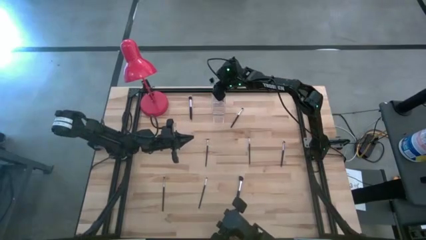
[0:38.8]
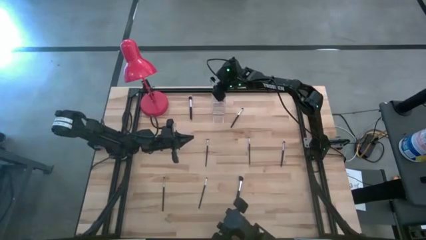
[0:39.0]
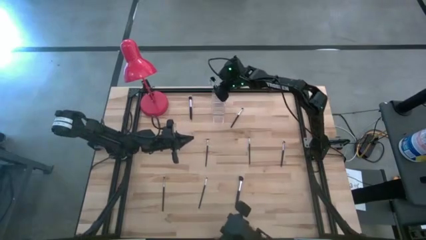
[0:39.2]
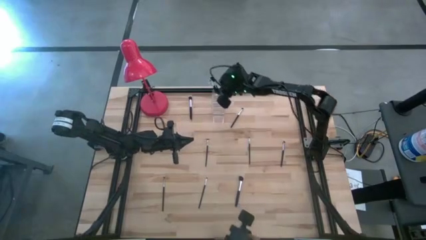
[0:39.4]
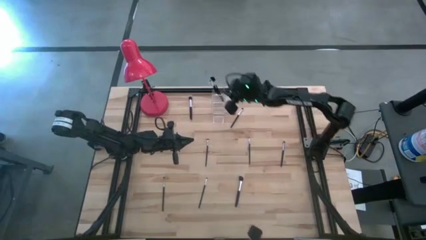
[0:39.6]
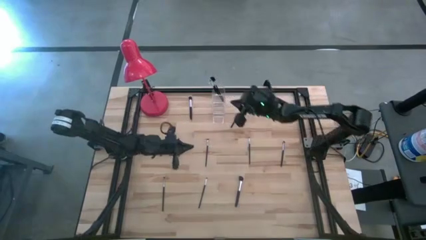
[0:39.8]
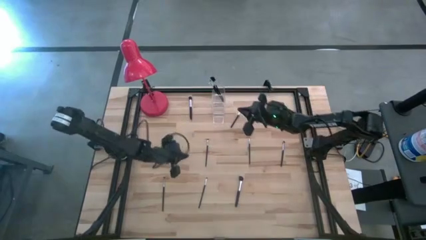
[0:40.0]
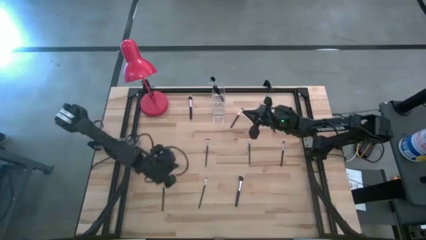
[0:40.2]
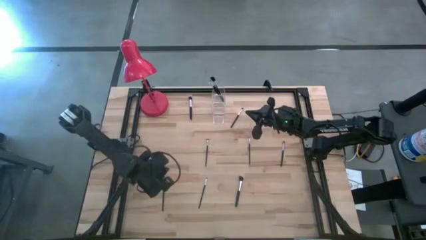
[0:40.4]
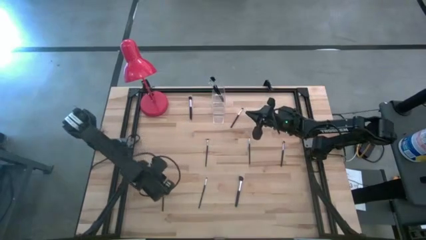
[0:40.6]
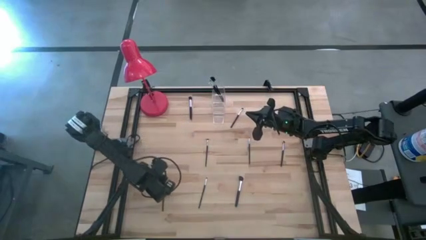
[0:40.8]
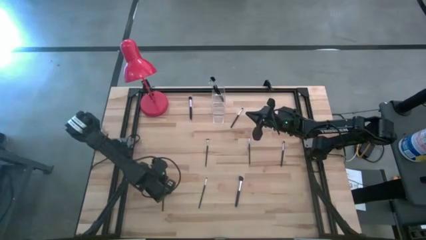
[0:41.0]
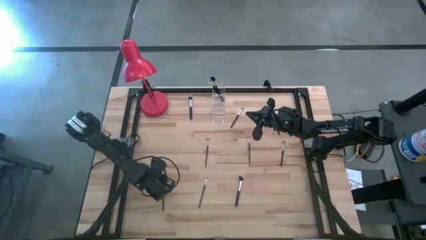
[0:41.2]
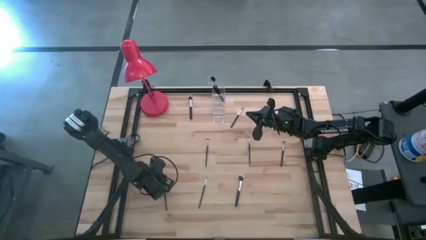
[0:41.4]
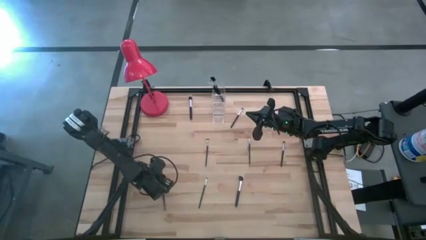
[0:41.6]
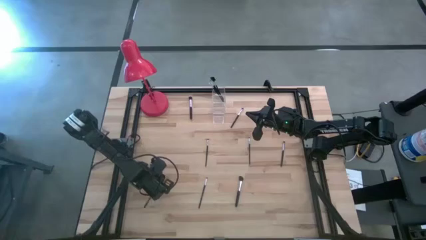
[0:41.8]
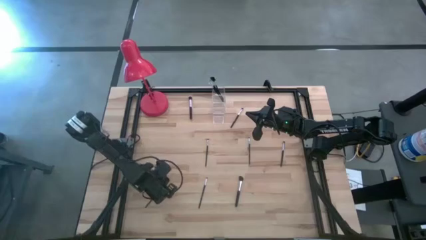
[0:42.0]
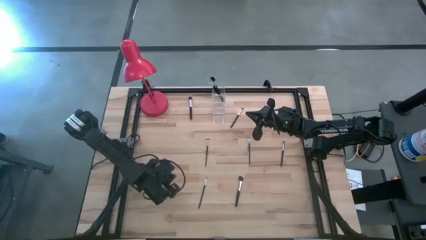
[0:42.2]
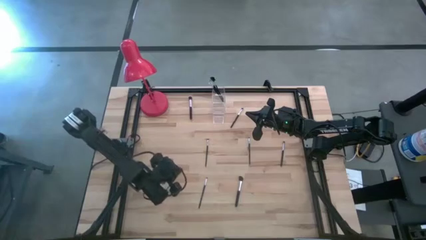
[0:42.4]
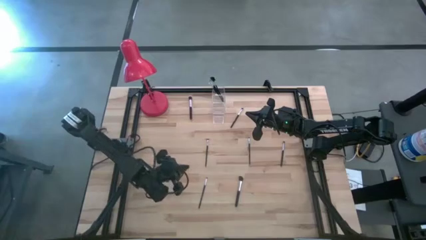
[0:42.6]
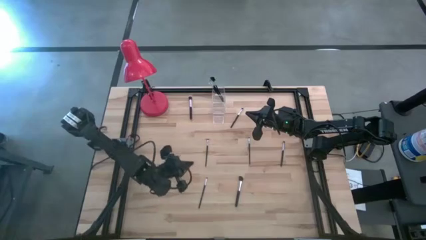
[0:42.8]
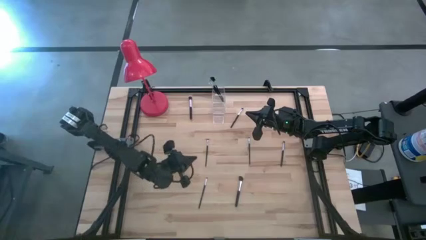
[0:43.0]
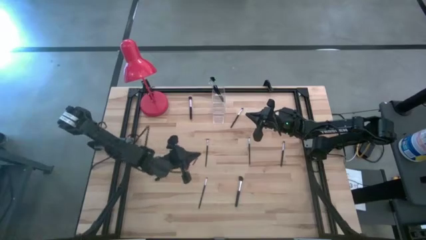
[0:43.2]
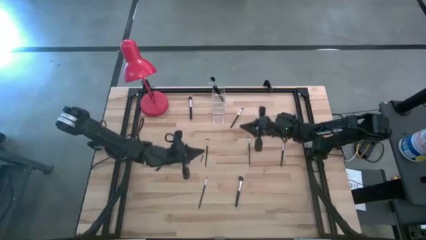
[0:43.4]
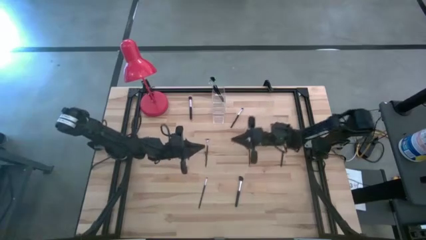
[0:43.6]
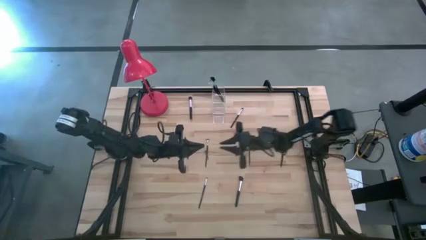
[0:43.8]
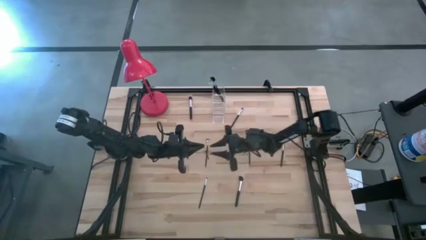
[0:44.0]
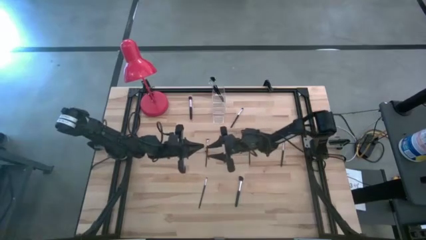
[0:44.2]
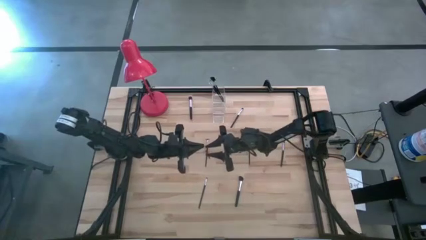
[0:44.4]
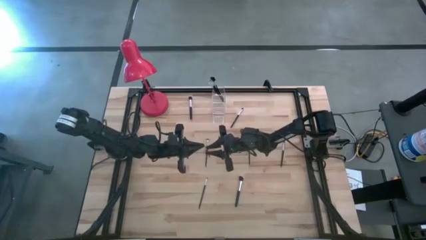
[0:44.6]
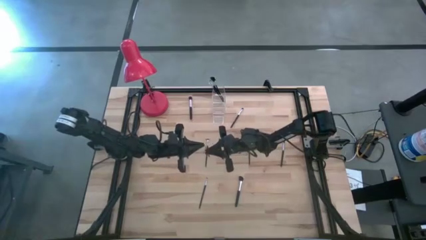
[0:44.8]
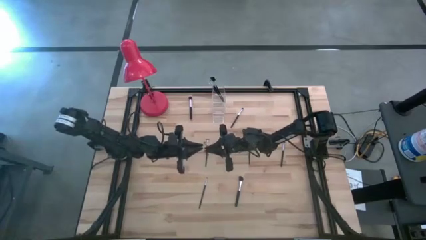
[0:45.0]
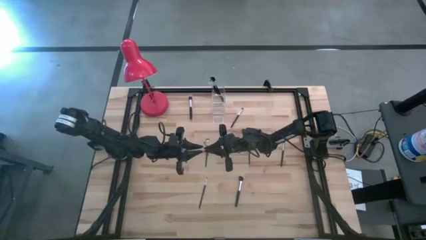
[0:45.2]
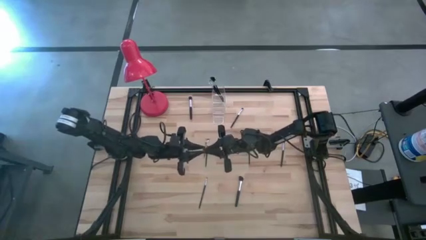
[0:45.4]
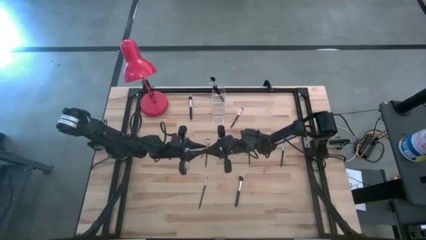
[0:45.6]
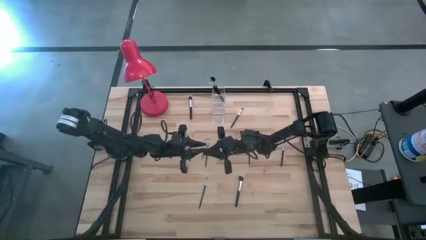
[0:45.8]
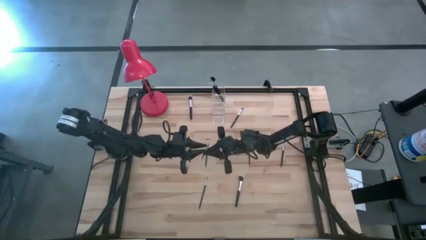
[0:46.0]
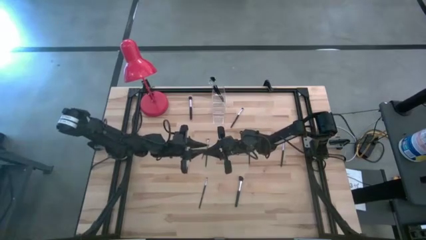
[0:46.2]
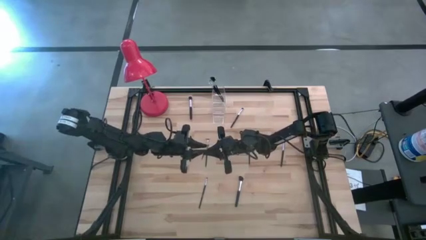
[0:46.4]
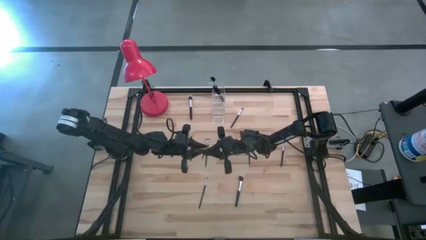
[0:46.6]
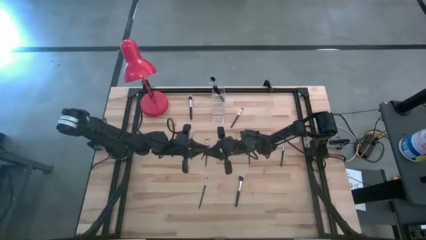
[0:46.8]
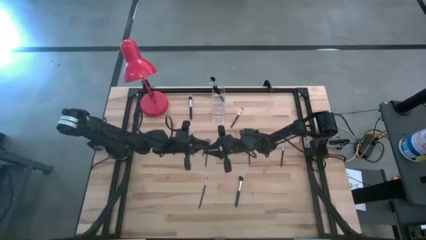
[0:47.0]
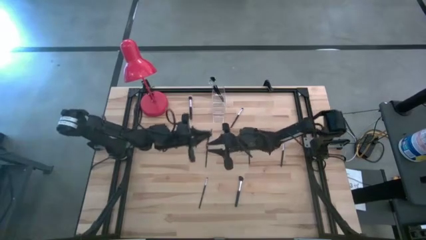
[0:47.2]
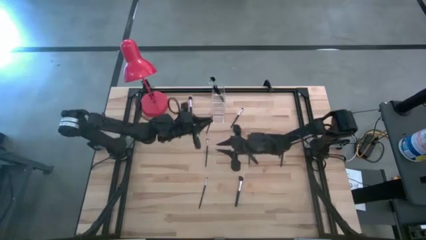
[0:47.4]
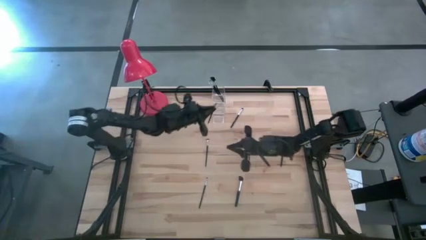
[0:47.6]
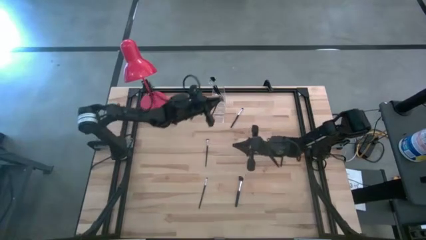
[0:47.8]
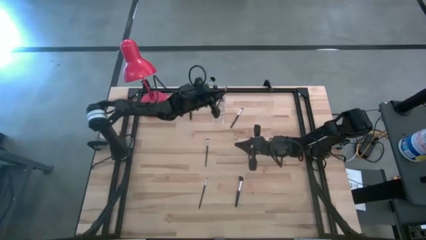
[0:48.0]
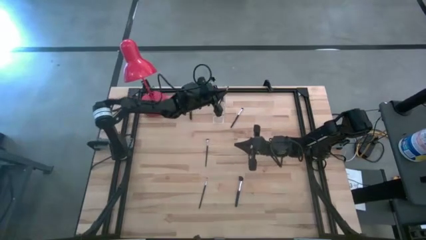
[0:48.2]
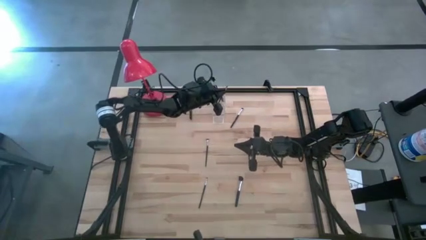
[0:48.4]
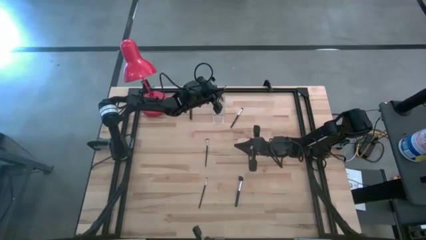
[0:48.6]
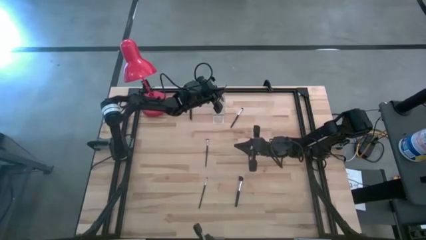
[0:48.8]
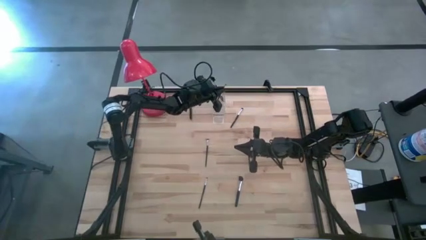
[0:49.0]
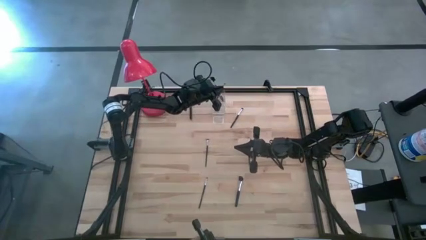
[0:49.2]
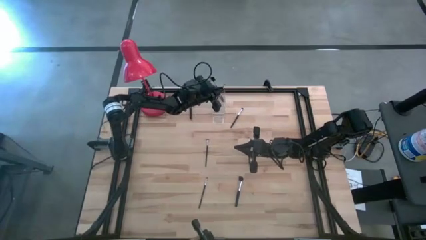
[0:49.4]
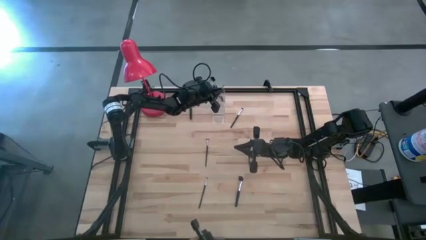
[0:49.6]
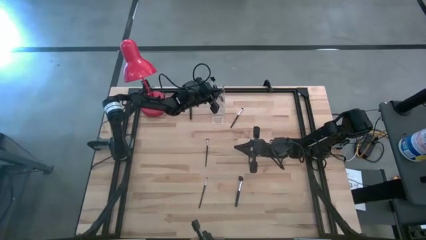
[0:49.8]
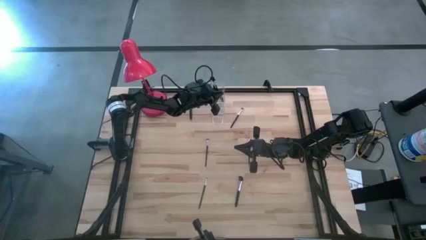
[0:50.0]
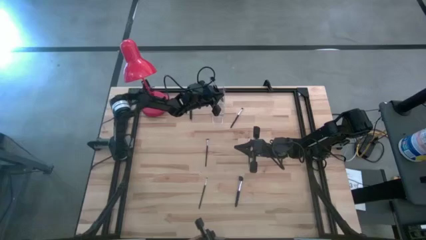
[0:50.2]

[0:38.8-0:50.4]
Task: Put items in baskets/containers
Put the black eyeshadow brush into the transparent organizer

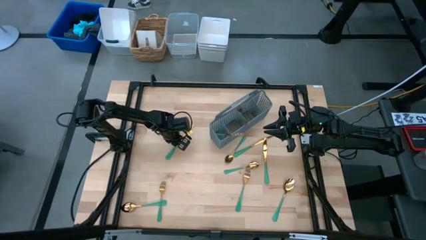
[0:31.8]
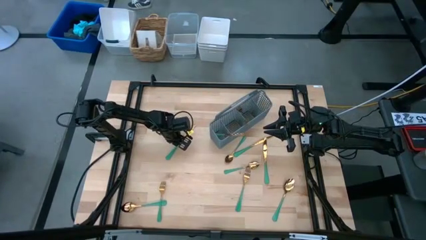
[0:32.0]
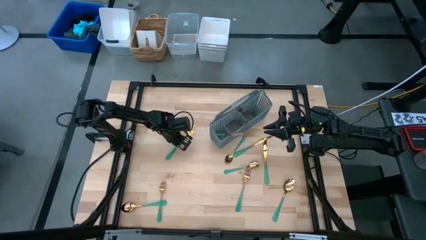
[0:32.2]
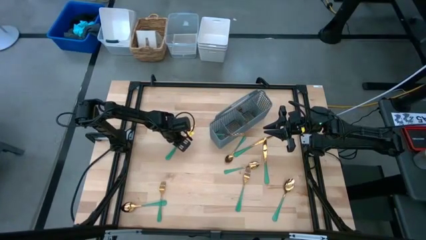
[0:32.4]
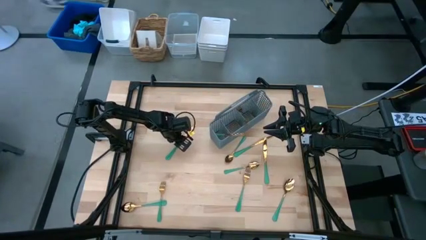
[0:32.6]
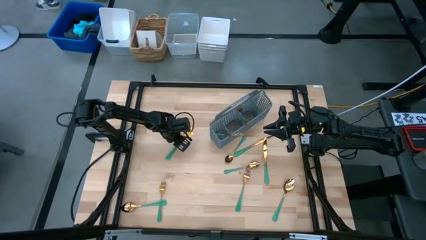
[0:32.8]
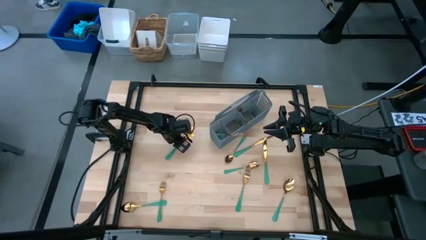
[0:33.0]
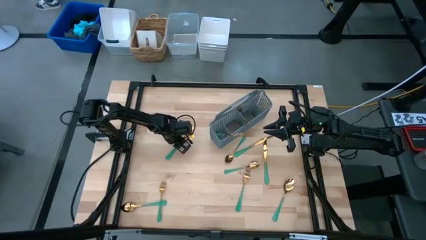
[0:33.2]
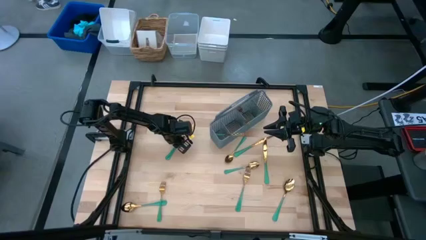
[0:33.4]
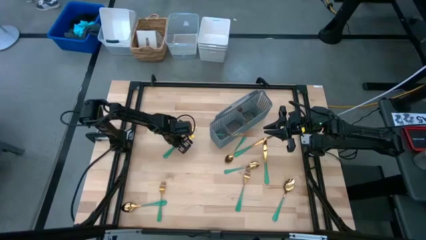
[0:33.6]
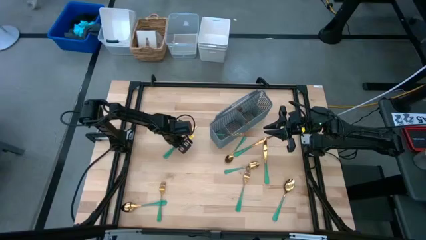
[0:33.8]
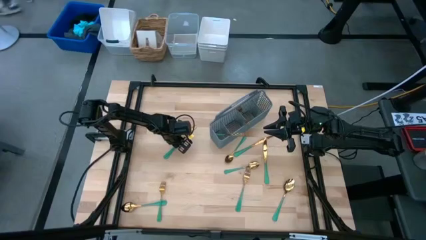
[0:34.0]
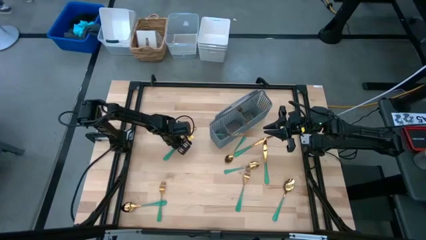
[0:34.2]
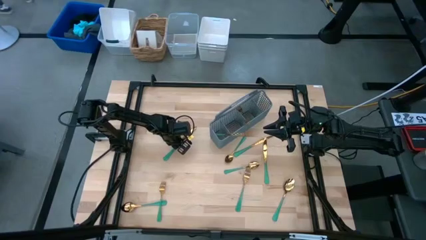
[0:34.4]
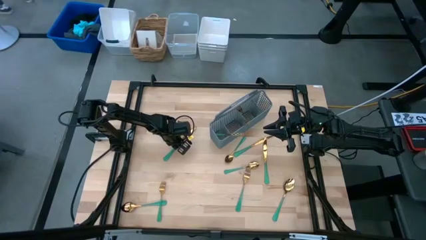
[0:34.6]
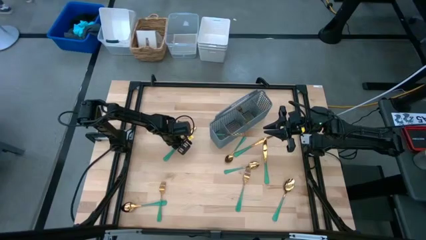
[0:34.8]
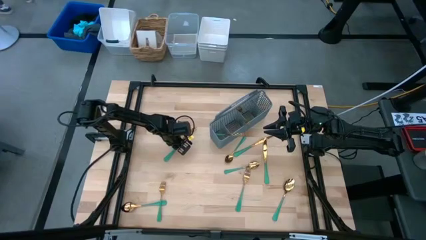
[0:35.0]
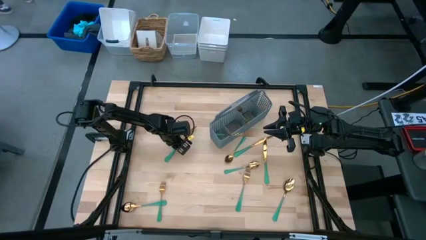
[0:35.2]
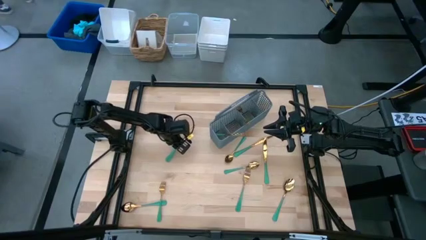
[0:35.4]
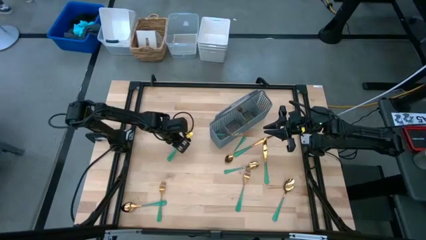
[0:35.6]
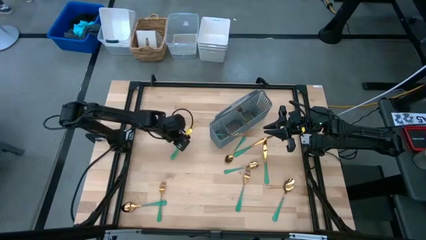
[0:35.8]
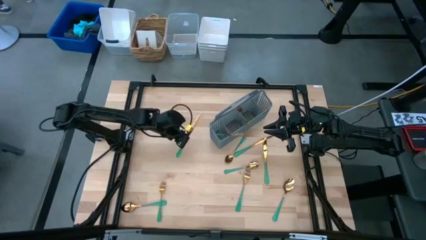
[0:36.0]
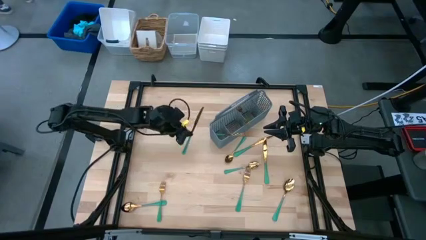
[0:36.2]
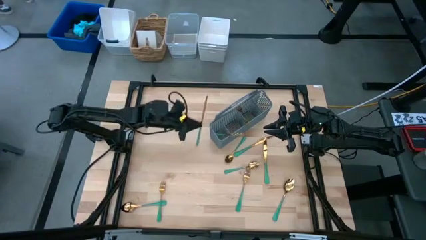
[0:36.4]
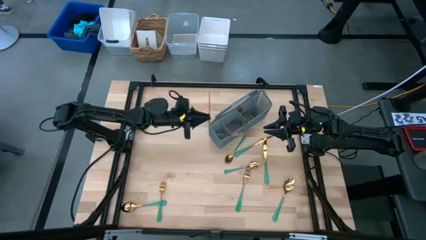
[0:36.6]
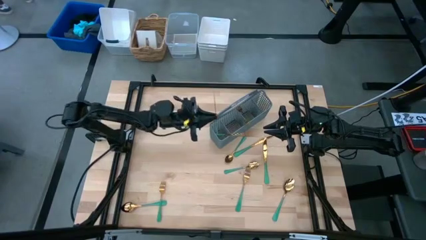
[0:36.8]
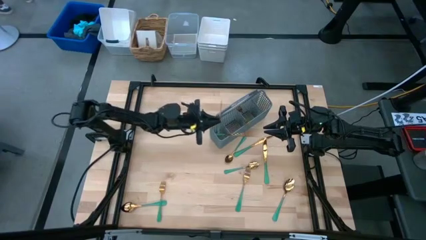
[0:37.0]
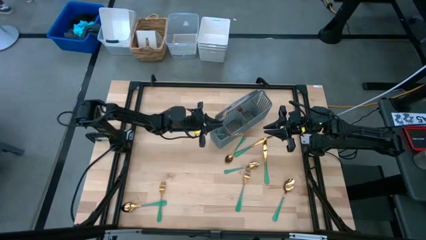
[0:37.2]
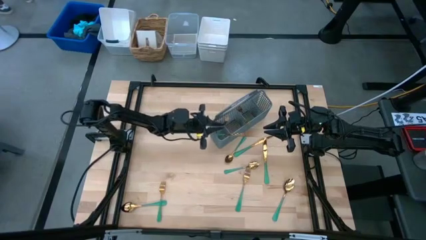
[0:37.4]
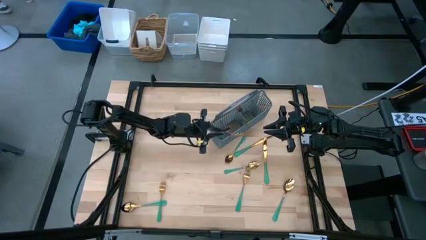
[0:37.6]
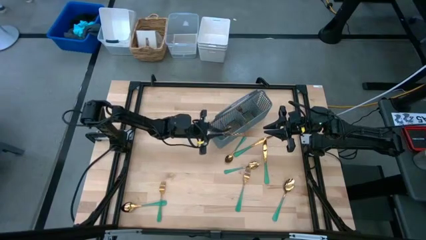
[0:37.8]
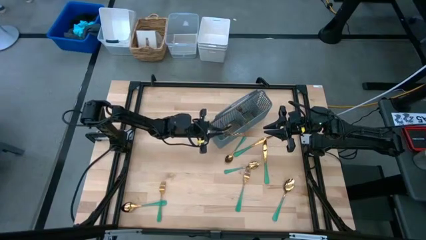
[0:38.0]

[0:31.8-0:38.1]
Task: Sort silverware
Put the left knife into the basket
